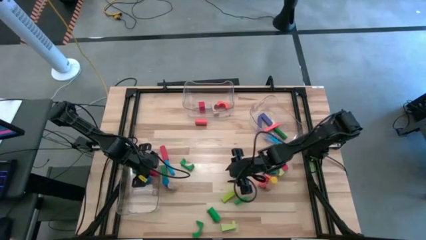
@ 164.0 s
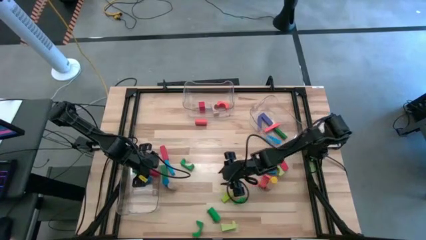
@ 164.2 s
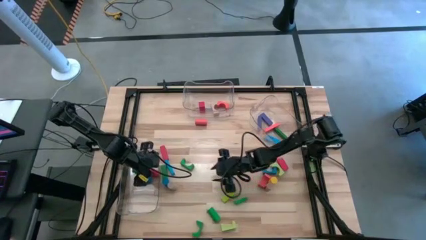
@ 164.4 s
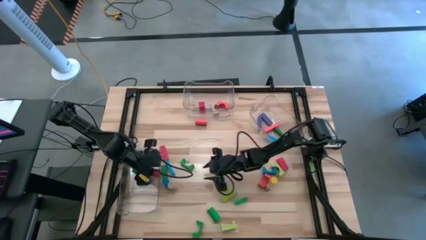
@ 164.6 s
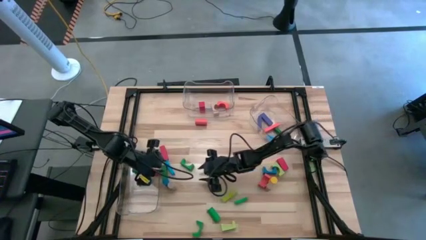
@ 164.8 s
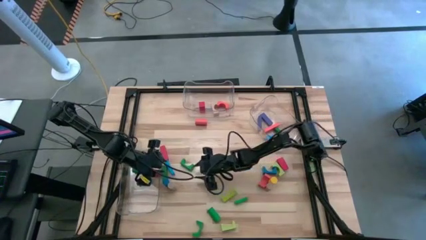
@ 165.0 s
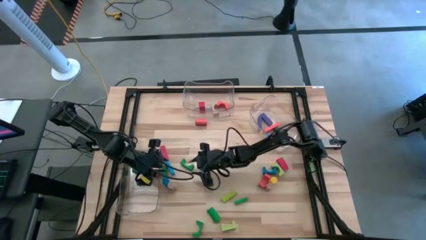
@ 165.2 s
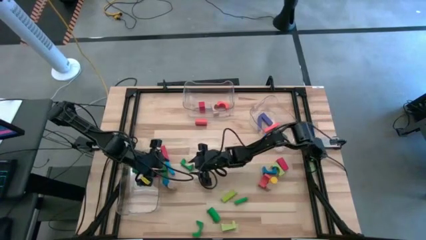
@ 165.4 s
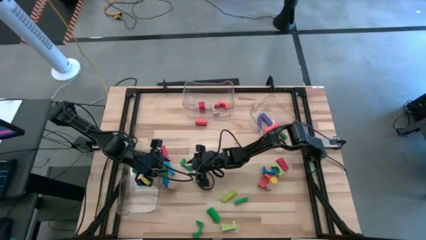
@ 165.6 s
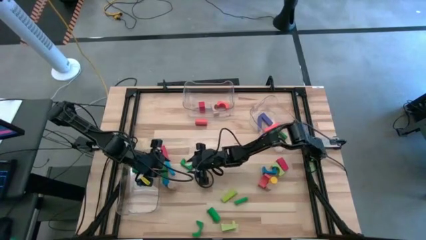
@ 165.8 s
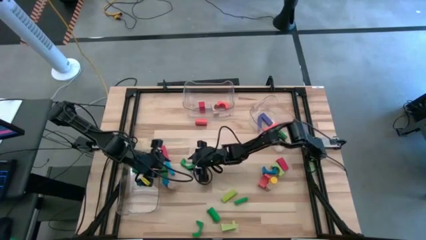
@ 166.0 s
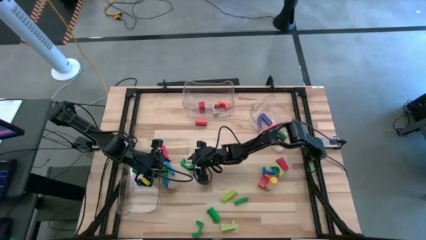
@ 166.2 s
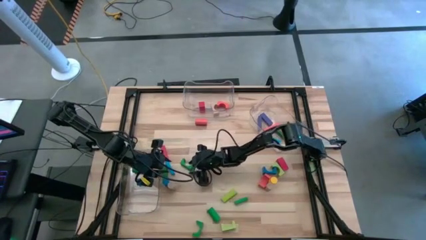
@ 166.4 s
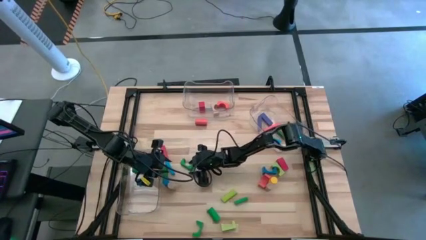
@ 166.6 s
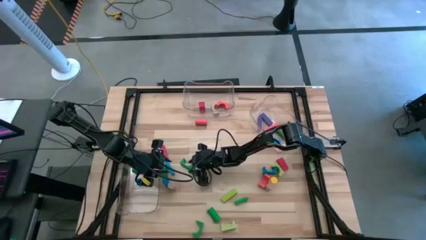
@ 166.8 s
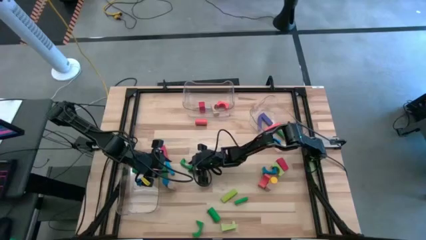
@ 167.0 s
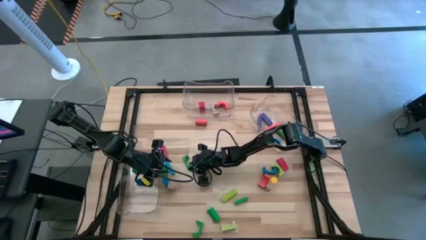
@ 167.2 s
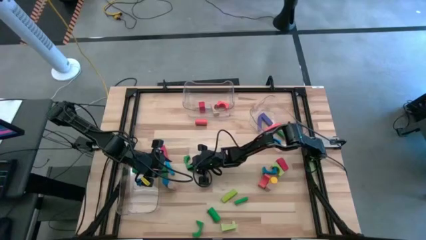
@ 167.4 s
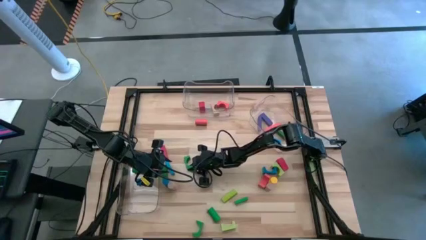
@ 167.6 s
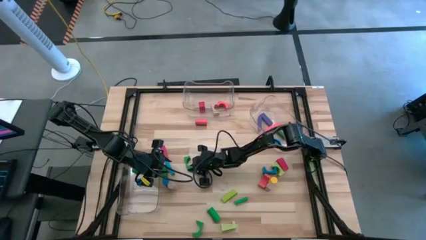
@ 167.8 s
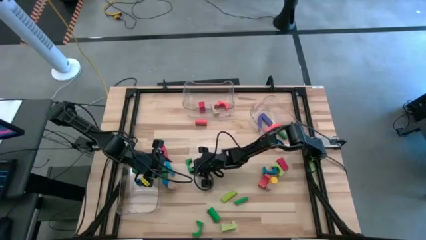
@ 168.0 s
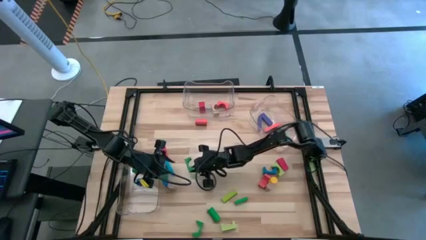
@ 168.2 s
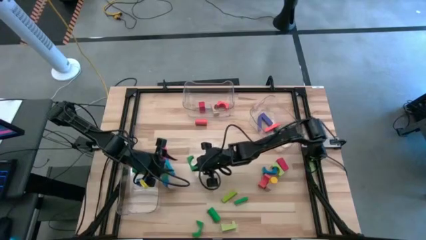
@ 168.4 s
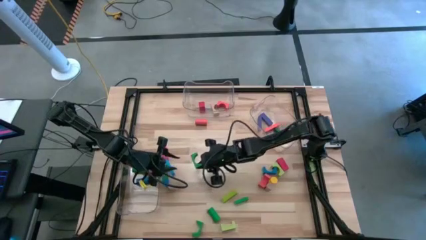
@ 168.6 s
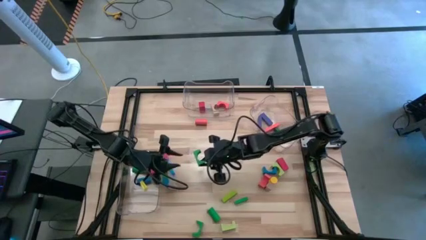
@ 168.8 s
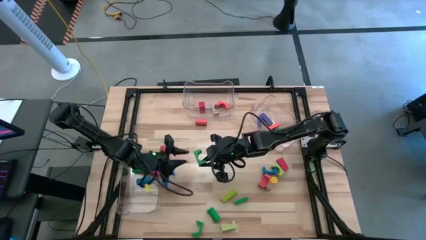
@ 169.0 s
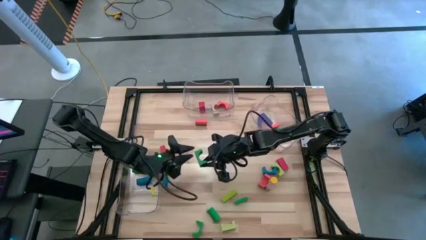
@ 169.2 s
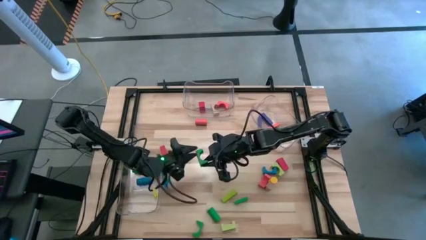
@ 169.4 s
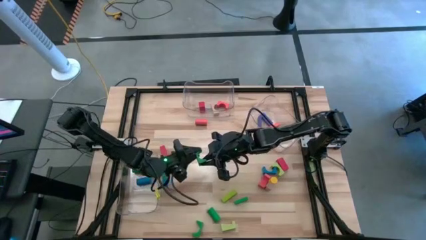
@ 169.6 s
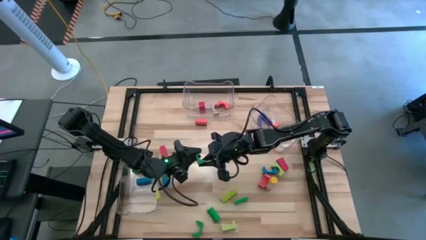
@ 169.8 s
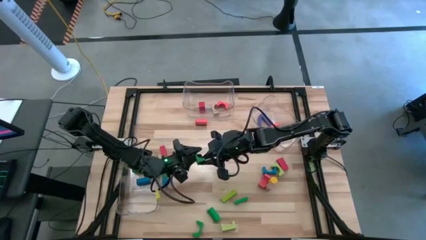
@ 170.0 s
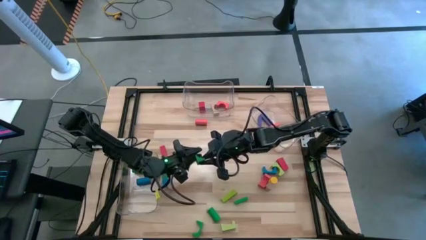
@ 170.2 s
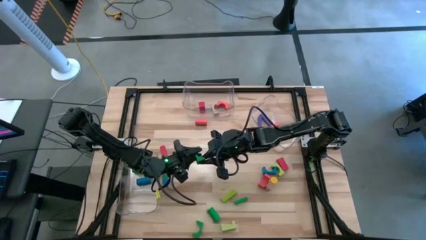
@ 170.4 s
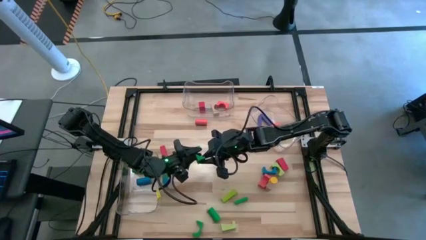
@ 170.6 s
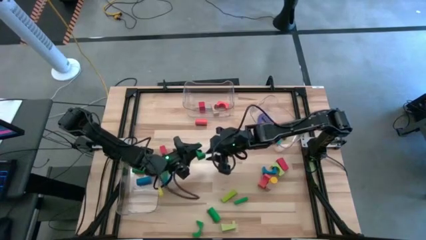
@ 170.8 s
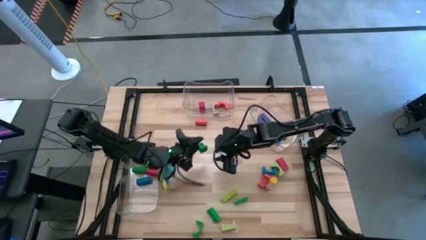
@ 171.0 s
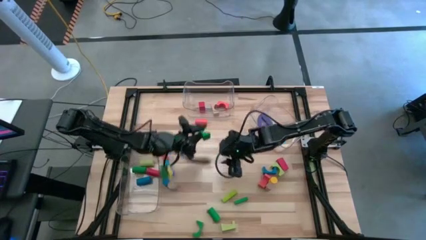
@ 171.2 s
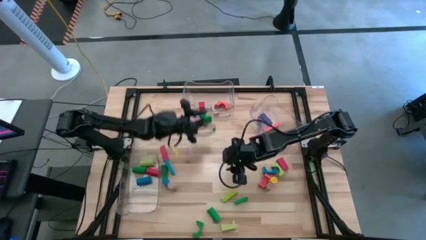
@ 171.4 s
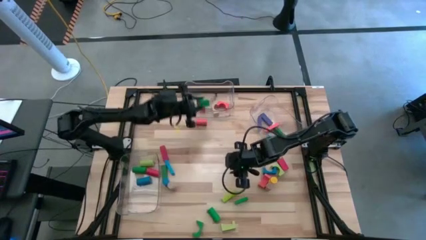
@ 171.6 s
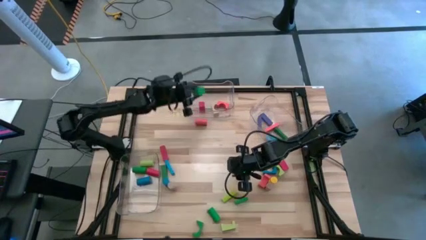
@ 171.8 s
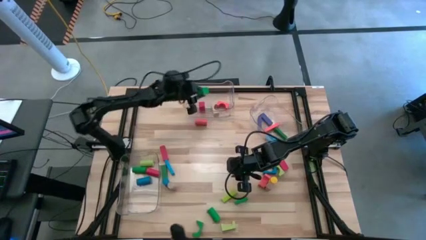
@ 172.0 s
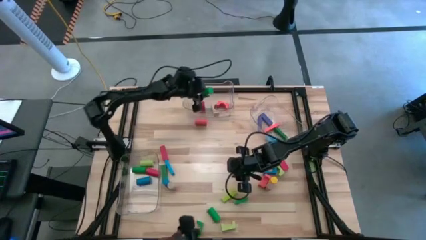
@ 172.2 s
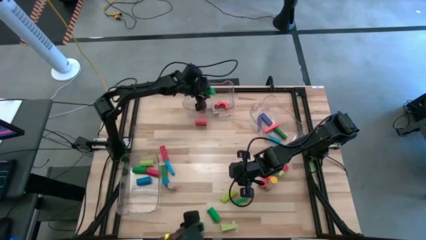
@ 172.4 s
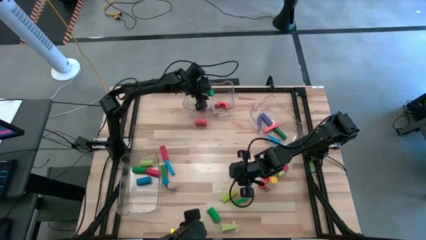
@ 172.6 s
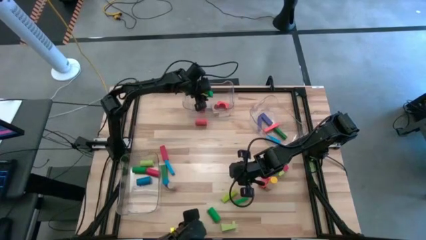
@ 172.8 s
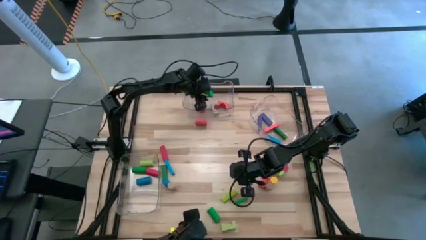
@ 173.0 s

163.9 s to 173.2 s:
Task: Sort blocks by size
Put the green arch block into the middle transparent bin

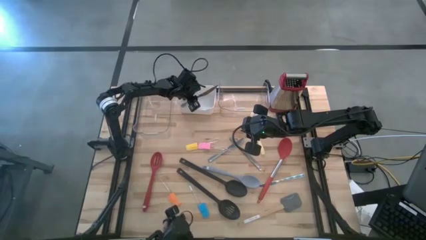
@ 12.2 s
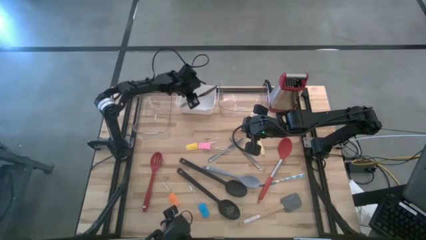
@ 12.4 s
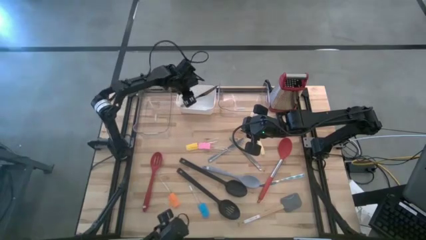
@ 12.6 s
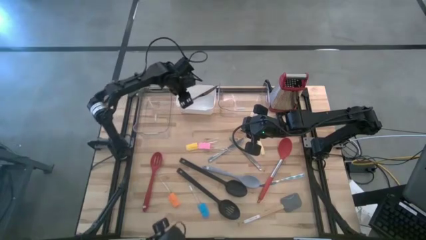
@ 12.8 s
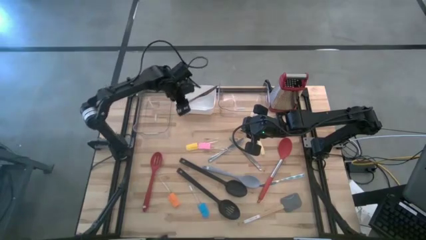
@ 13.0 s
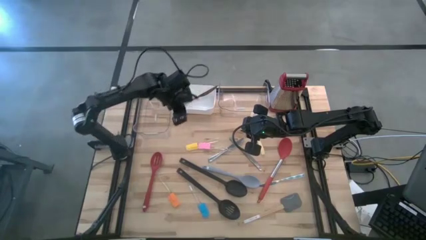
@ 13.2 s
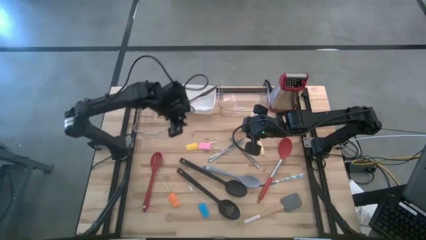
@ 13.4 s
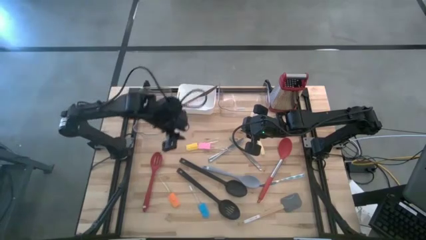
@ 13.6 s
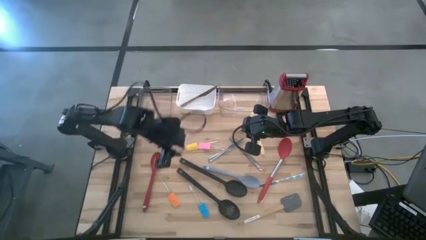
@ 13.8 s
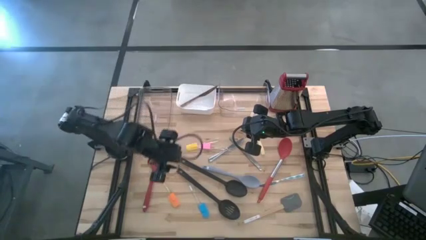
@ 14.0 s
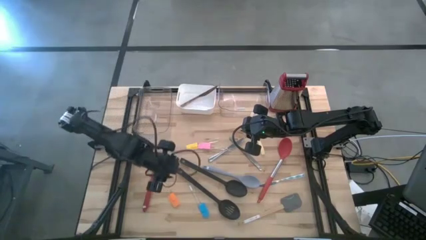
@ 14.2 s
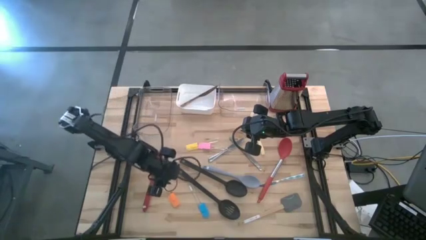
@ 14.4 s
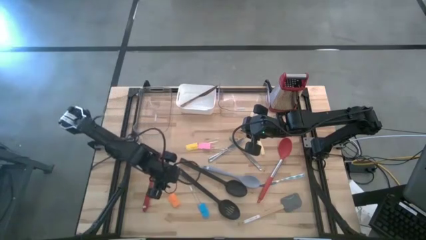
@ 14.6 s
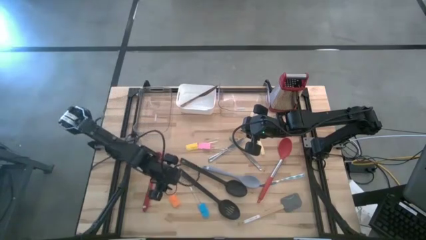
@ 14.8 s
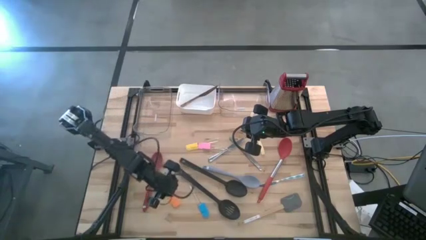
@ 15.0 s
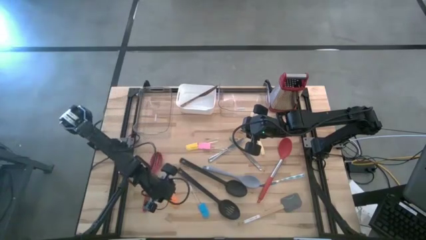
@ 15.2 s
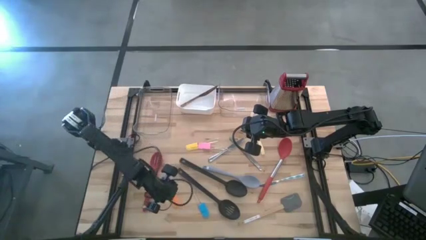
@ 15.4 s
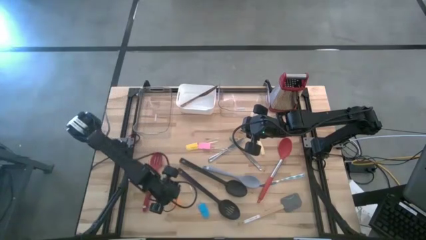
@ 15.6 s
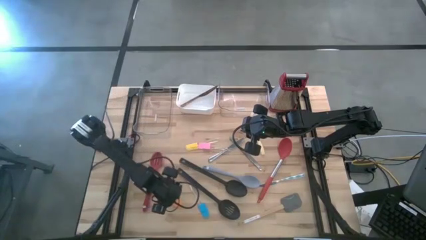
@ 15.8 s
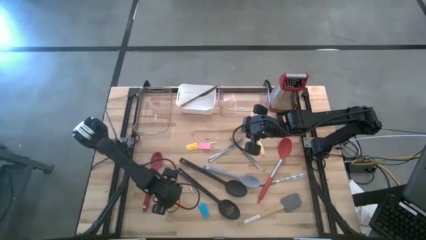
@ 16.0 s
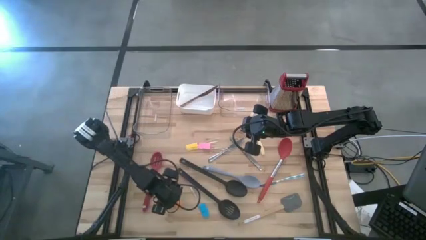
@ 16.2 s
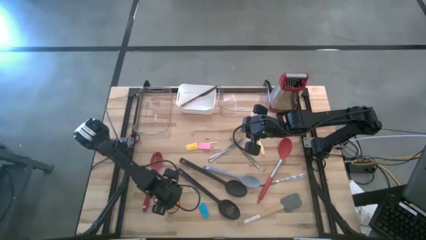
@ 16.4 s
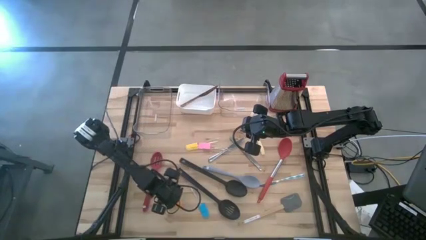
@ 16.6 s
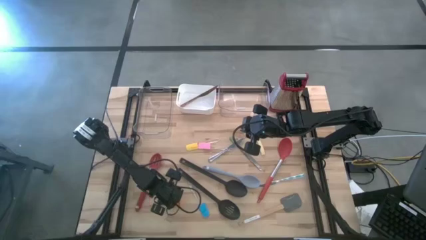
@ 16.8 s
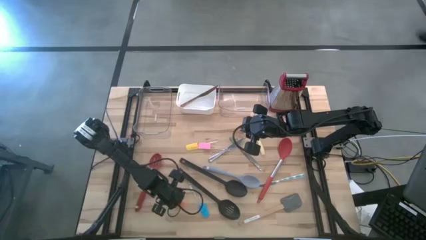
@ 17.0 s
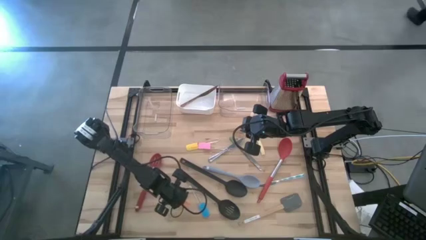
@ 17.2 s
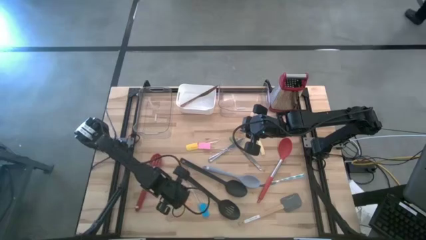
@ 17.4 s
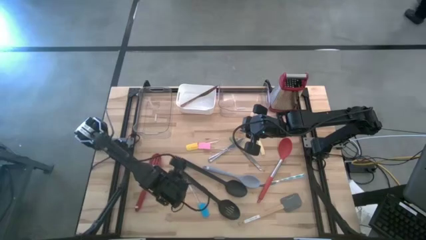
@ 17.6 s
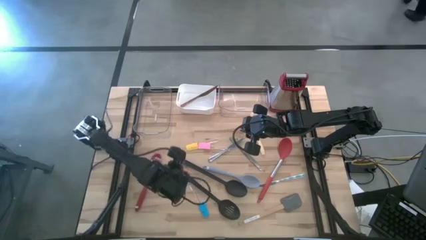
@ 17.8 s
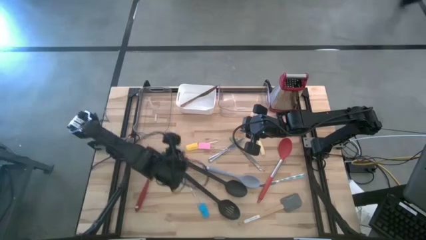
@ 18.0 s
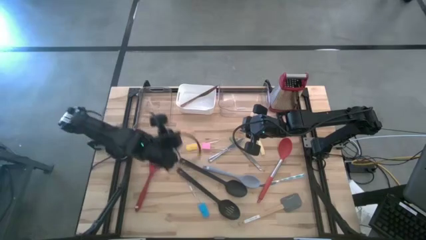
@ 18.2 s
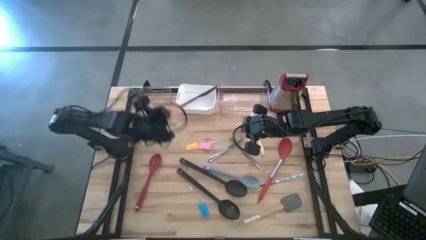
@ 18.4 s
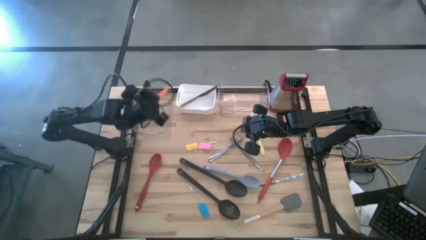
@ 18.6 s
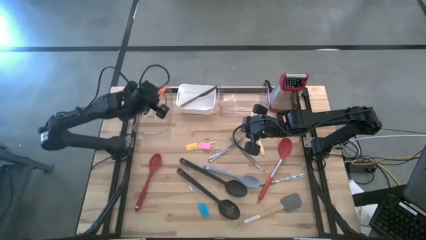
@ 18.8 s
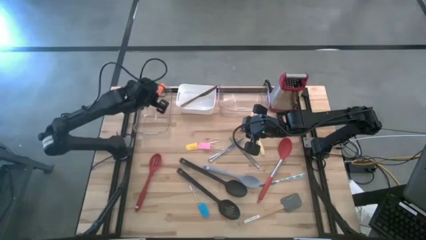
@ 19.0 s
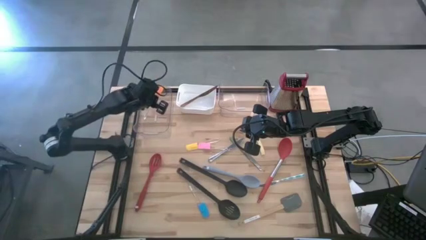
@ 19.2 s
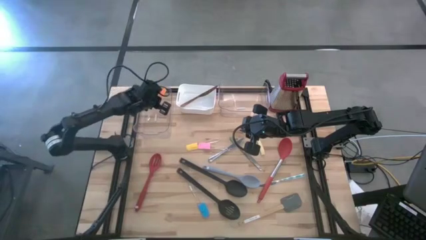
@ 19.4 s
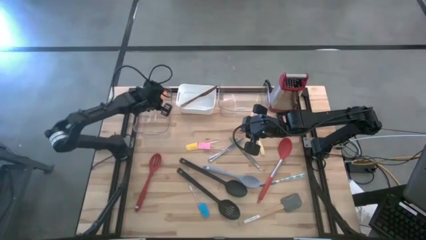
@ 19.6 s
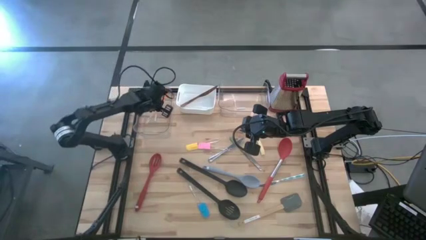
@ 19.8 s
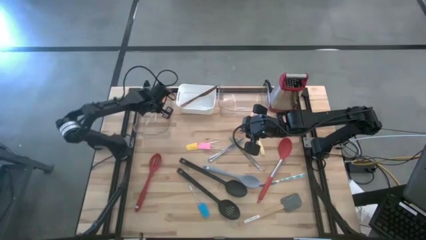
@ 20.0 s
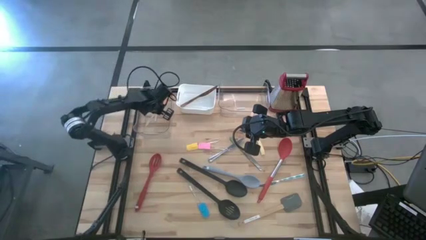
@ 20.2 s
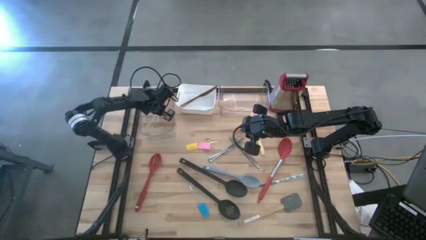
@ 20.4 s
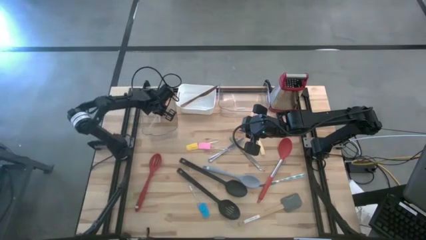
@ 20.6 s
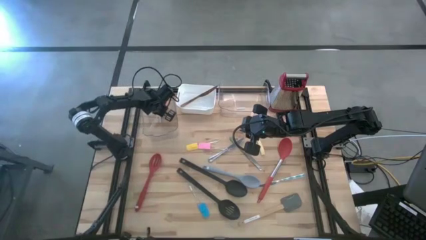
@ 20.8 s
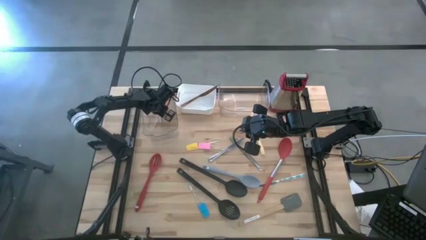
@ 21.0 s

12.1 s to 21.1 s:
Task: Pick & Place Kitchen Items
Put the orange spatula into the left transparent bin
